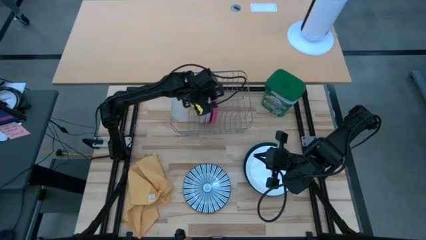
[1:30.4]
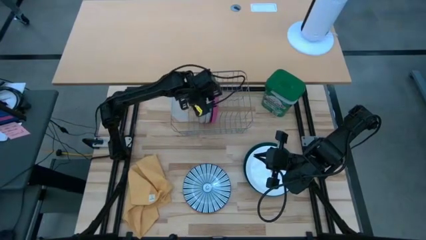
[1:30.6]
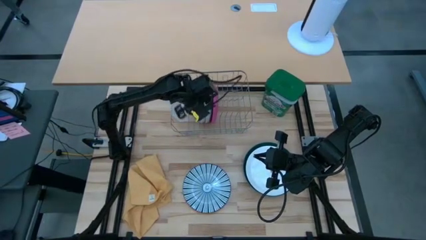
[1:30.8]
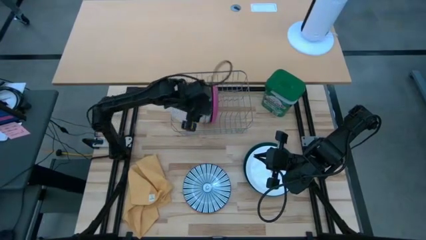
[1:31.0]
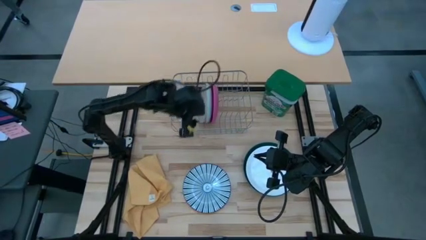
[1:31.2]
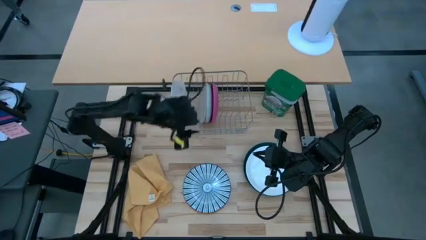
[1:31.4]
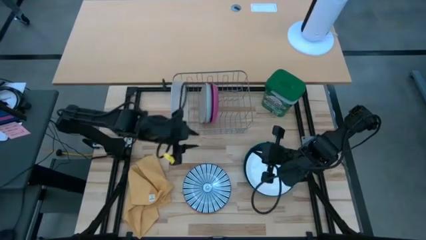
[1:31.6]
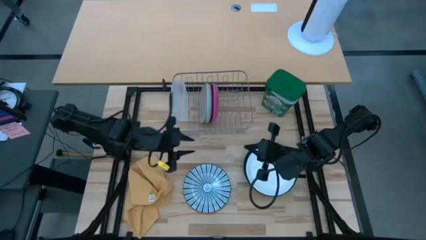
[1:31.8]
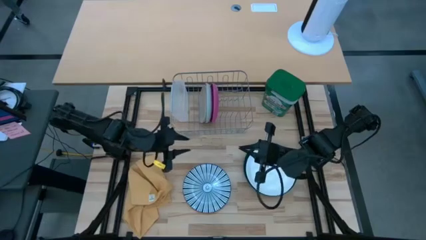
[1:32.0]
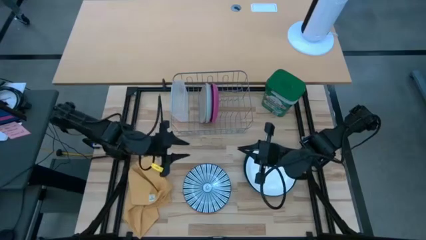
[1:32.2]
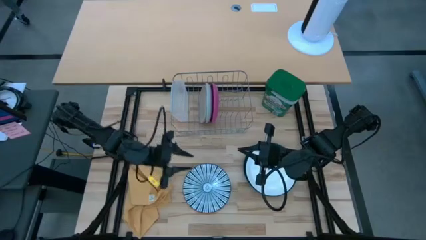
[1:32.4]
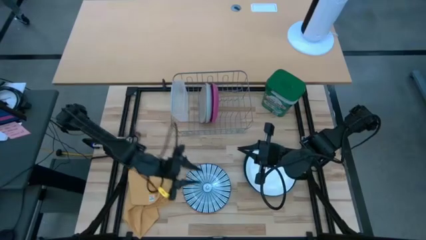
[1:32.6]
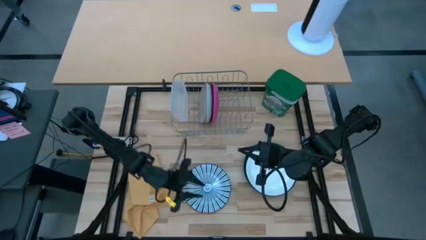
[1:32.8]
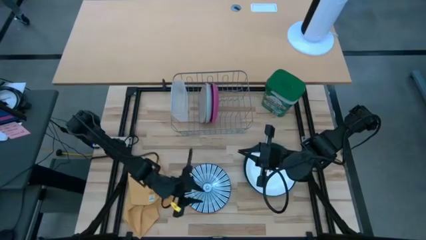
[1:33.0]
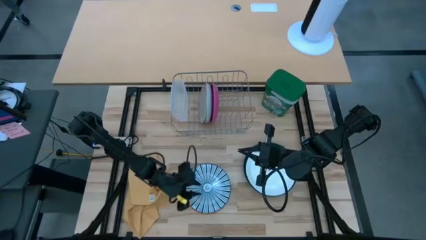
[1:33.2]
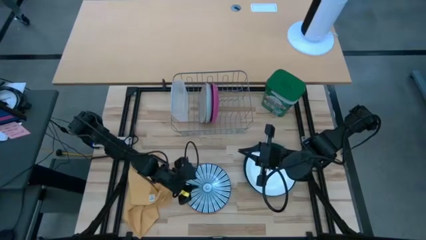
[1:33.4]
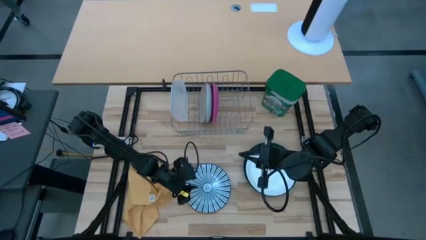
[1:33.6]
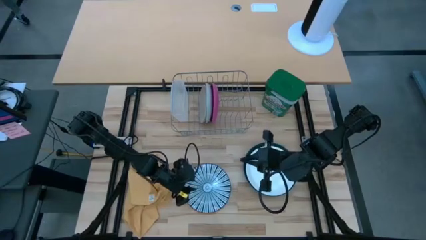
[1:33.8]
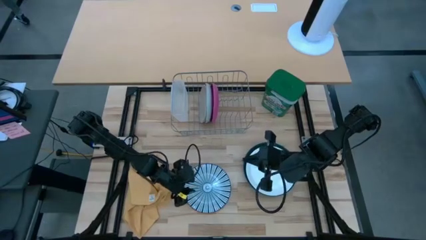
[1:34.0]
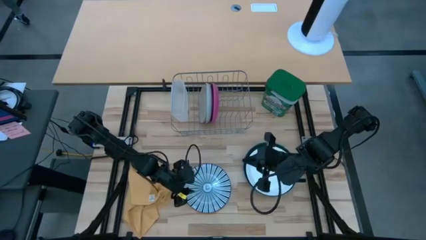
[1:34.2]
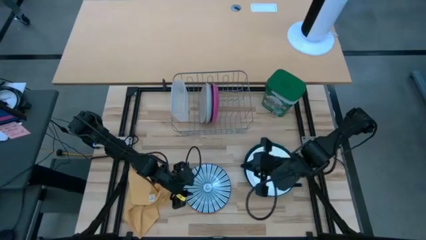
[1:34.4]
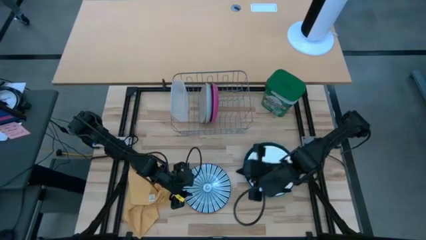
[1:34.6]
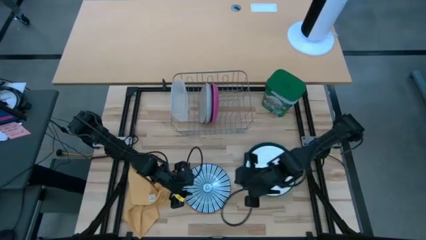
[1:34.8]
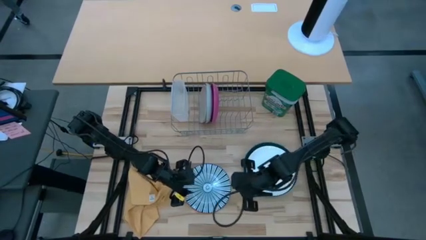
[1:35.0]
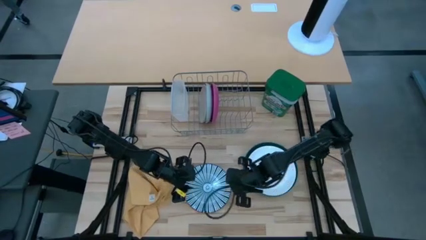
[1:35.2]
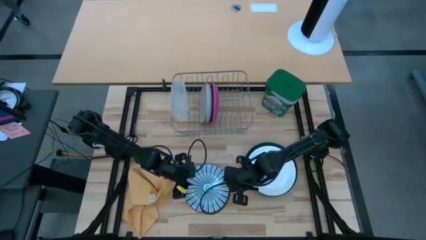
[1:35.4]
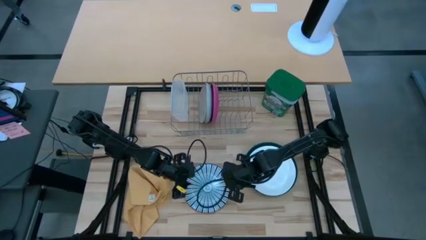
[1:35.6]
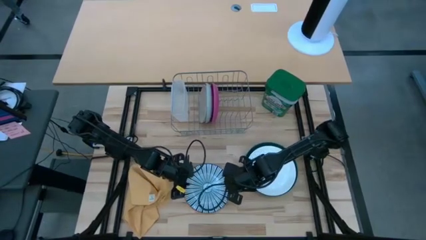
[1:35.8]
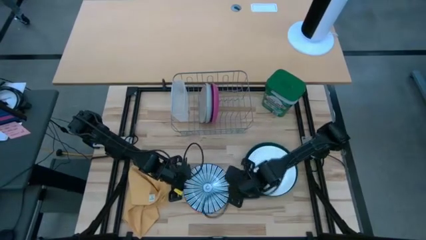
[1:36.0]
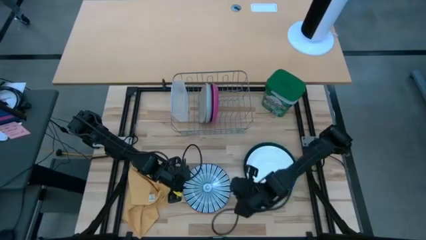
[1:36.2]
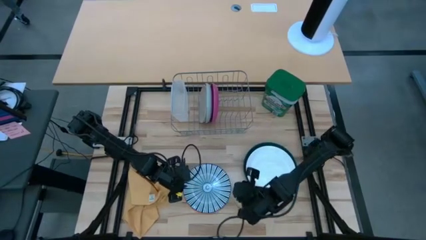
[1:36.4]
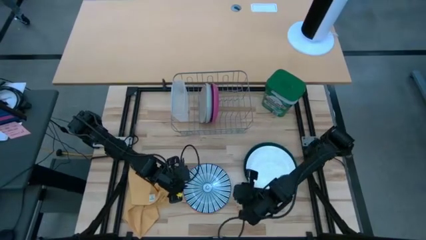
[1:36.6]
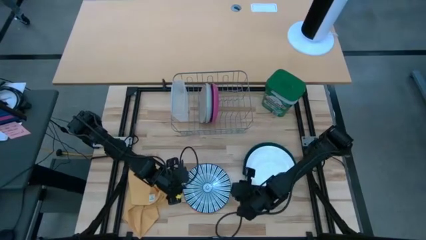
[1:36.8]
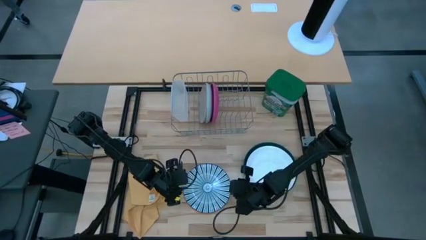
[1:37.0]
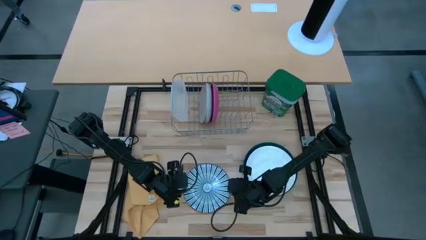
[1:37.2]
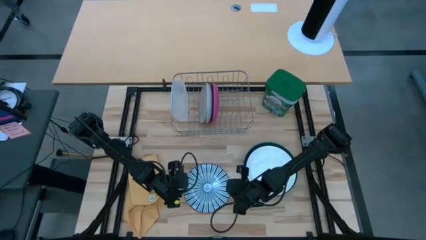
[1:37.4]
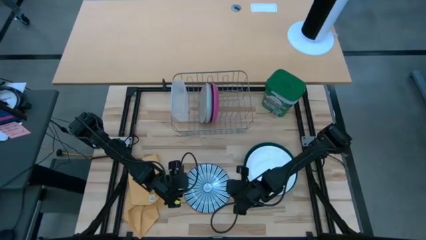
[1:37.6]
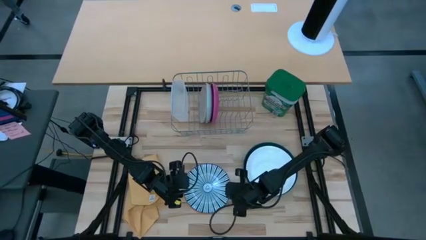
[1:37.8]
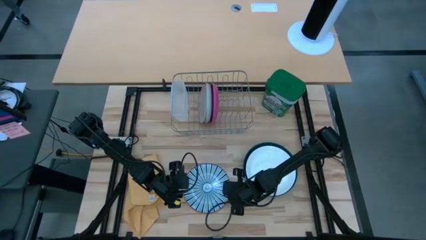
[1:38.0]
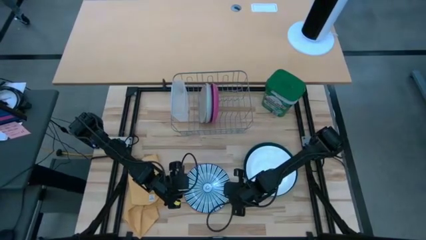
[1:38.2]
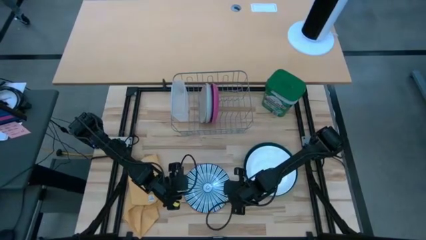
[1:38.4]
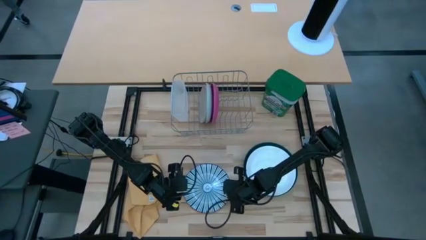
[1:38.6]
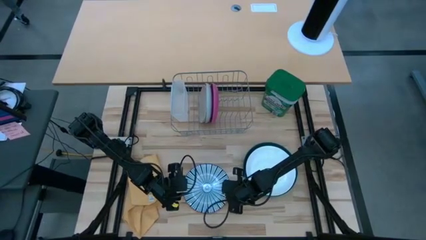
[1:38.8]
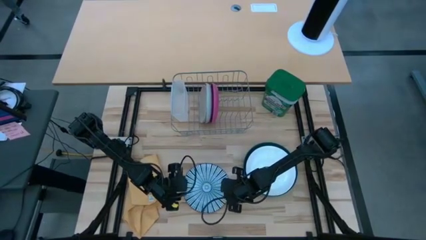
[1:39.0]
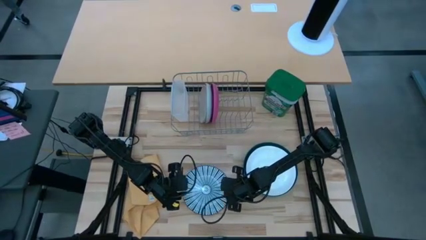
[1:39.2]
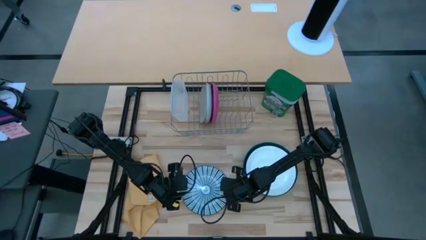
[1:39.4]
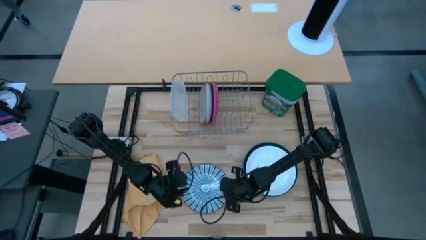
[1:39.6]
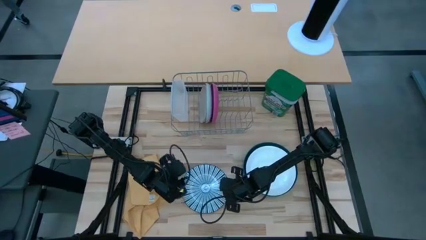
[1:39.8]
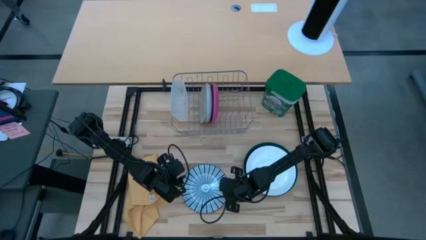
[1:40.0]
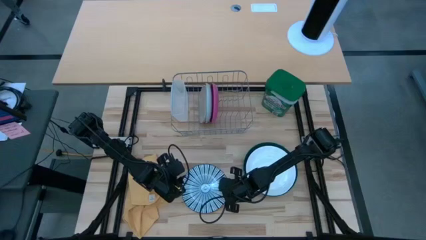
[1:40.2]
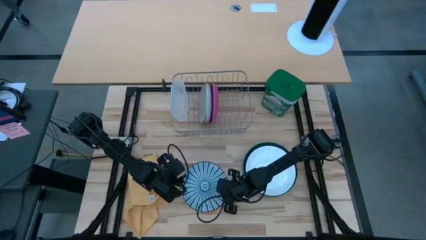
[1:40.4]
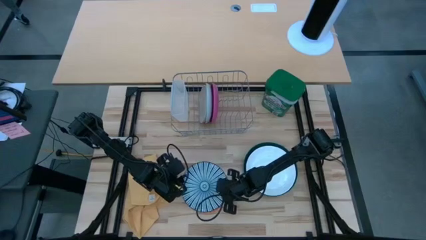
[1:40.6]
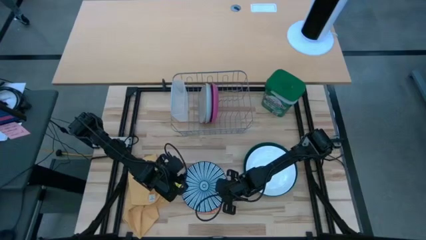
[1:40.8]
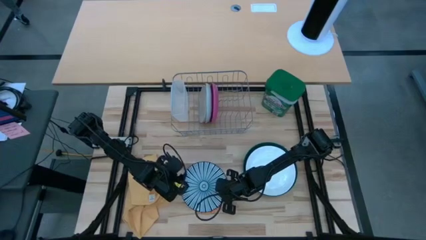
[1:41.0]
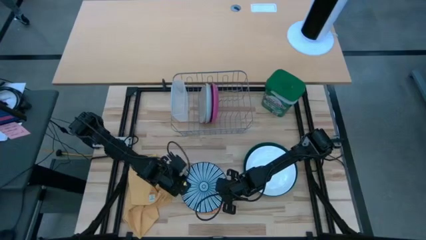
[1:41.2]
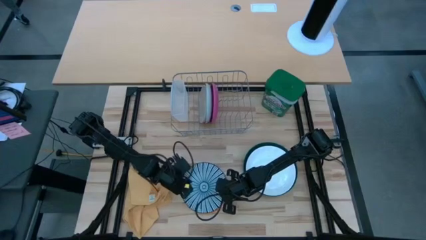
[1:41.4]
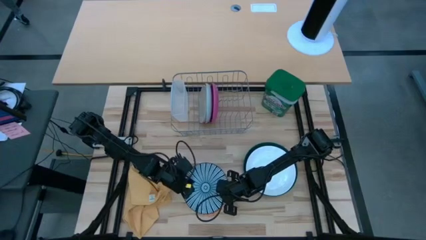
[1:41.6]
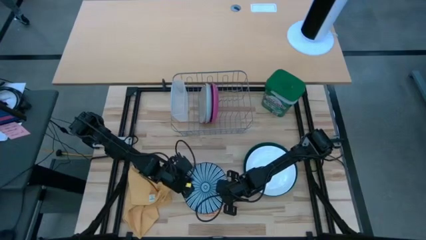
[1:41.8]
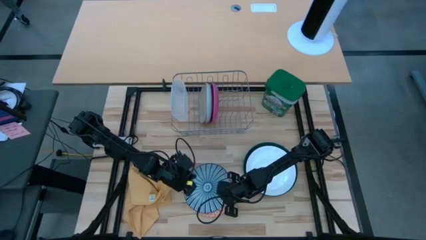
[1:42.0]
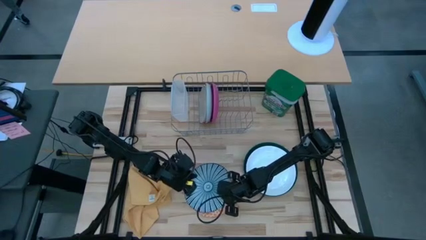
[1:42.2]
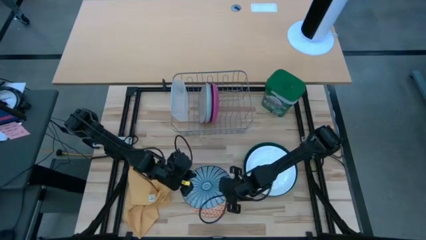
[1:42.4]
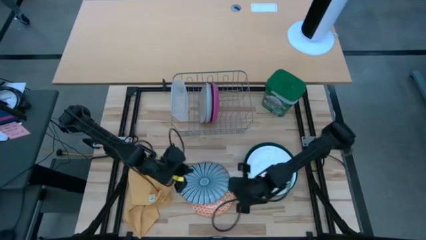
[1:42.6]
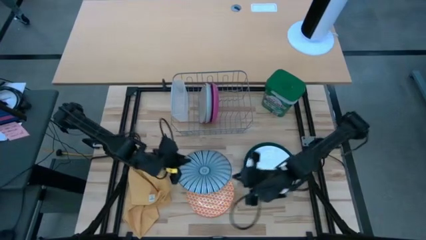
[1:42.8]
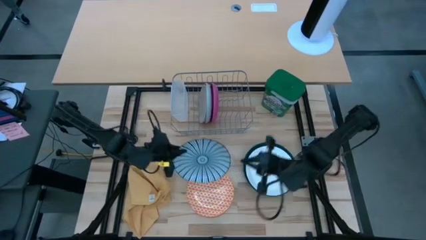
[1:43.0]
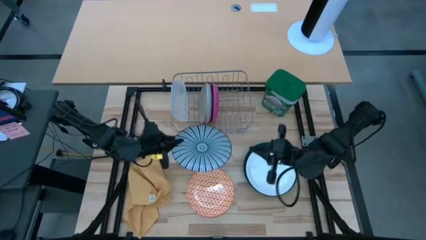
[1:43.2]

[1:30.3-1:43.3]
Task: Sort dishes
Put the blue patterned plate into the dish rack

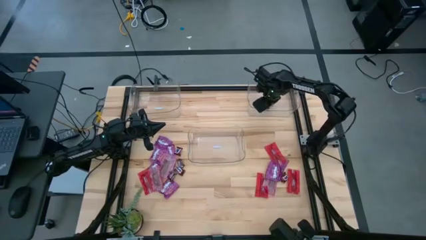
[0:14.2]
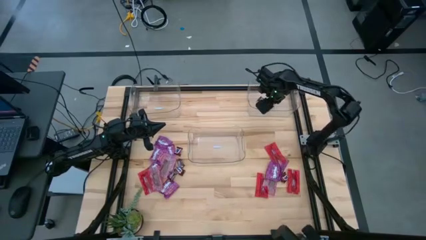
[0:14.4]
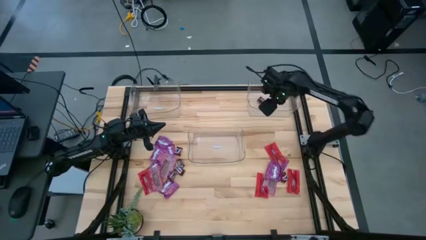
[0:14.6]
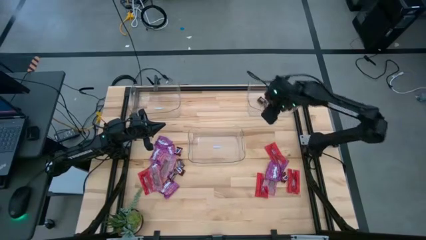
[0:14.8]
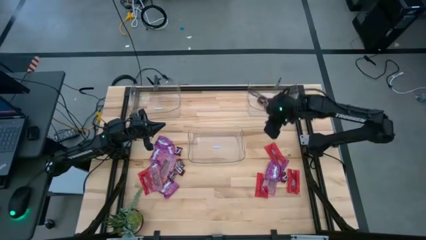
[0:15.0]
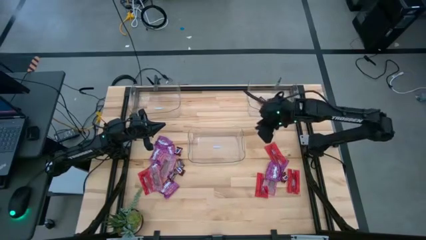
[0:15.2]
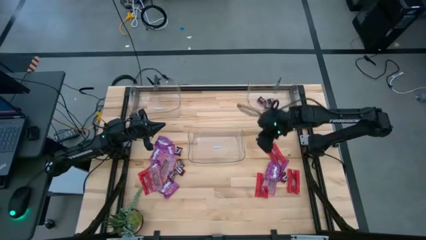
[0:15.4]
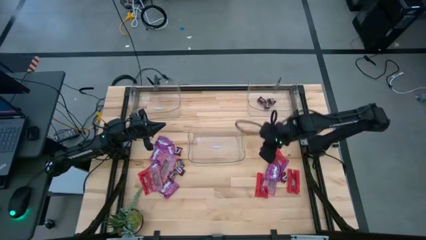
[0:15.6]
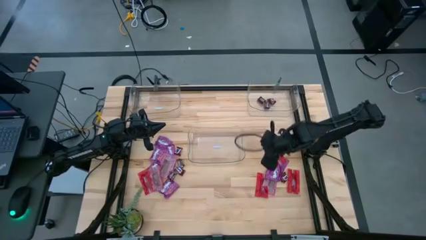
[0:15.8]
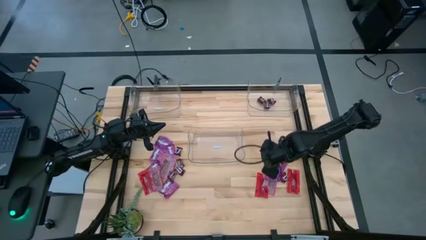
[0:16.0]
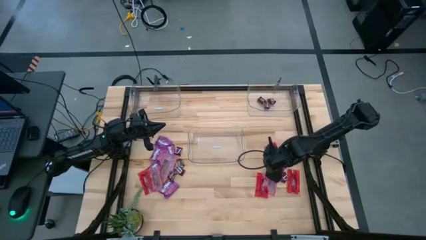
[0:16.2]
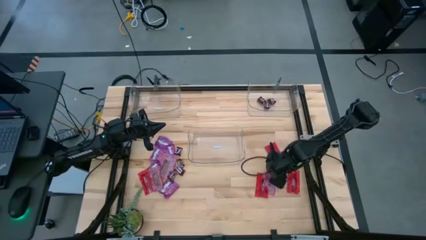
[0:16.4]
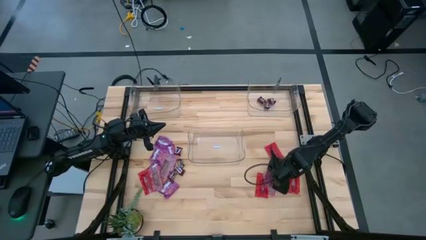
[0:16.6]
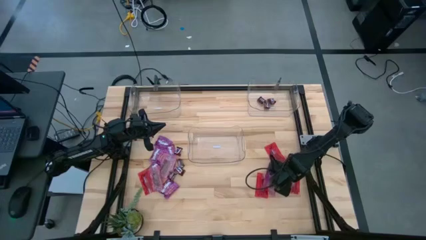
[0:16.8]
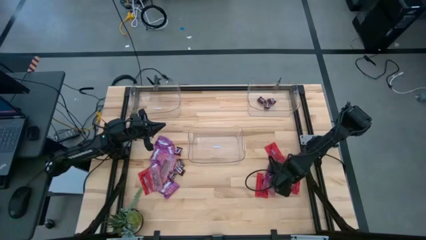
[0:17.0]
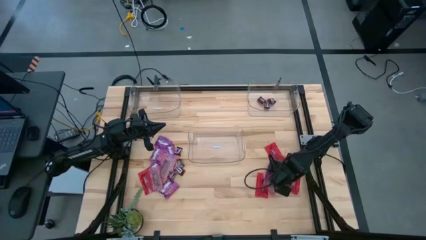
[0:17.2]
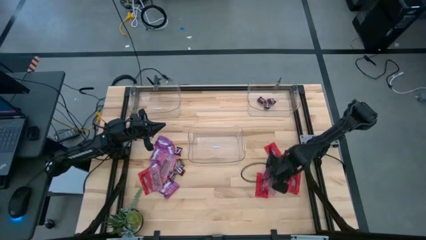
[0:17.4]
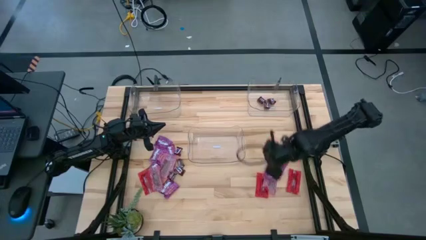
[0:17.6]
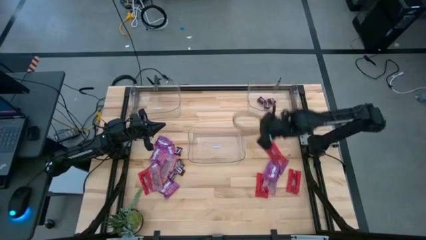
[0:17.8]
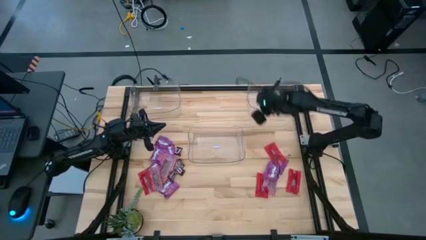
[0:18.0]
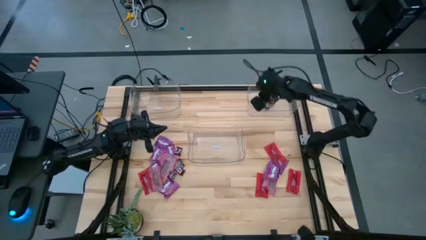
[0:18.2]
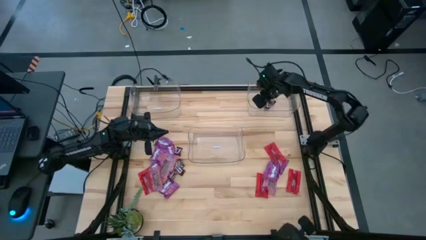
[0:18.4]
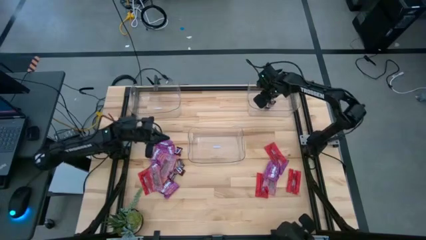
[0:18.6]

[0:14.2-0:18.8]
Task: Sort candy
Put the brown chocolate bar into the top right transparent bin
